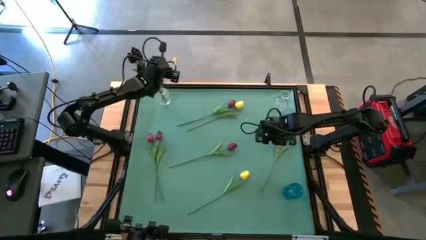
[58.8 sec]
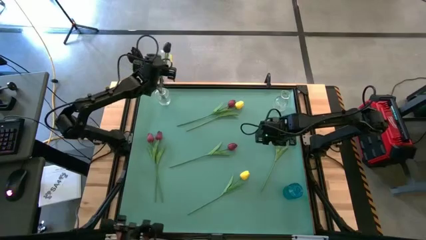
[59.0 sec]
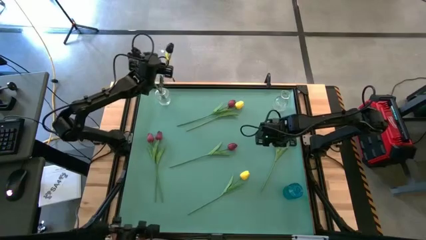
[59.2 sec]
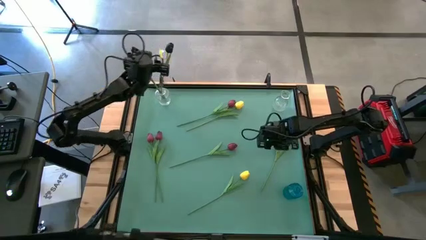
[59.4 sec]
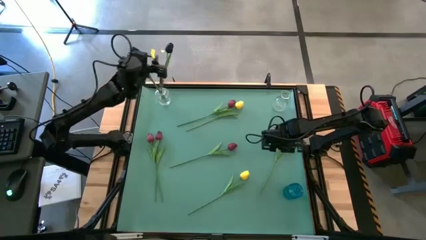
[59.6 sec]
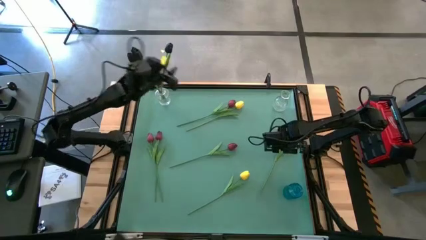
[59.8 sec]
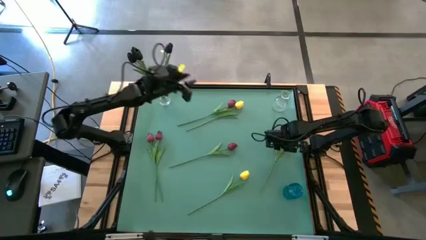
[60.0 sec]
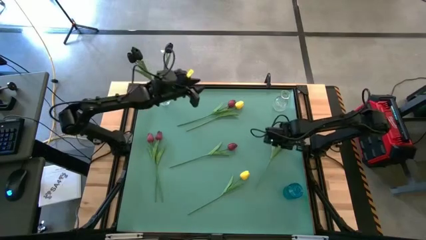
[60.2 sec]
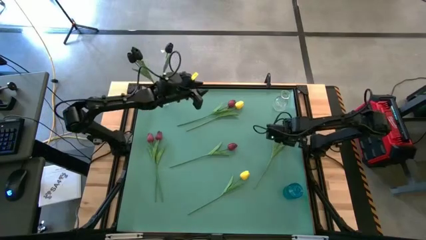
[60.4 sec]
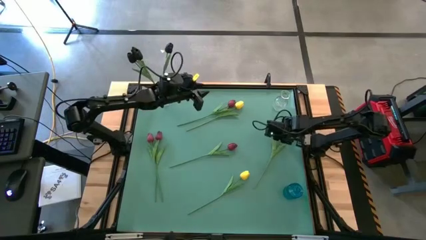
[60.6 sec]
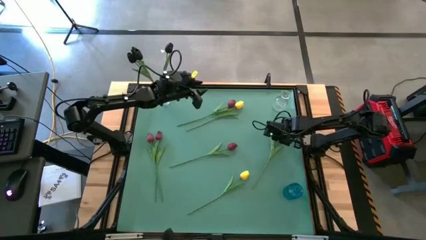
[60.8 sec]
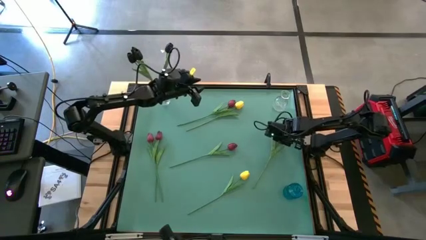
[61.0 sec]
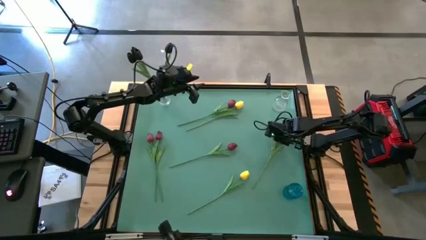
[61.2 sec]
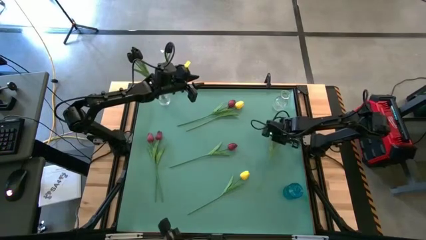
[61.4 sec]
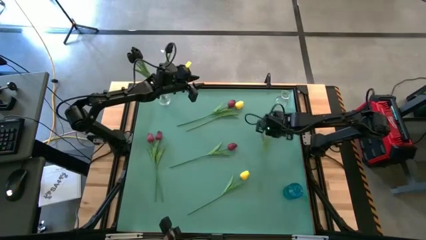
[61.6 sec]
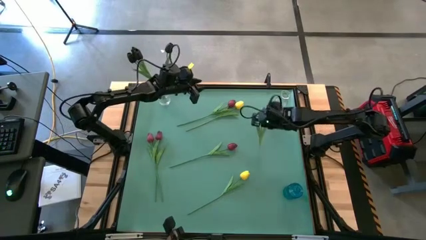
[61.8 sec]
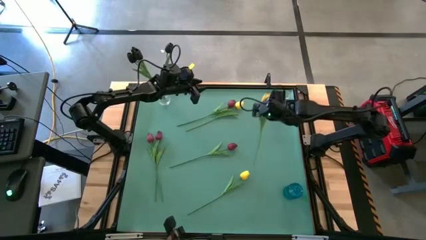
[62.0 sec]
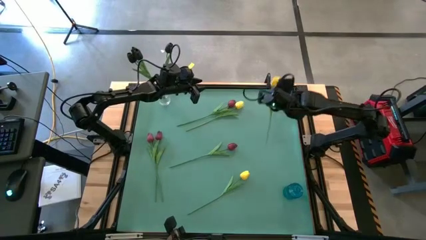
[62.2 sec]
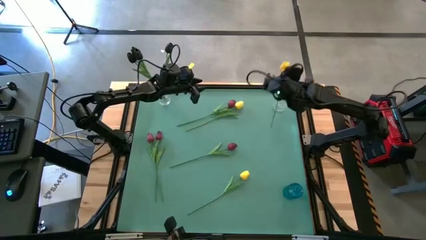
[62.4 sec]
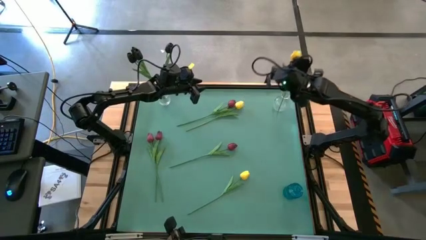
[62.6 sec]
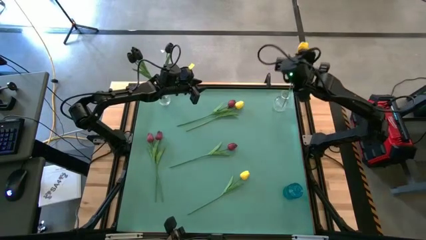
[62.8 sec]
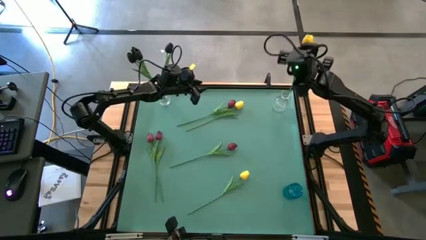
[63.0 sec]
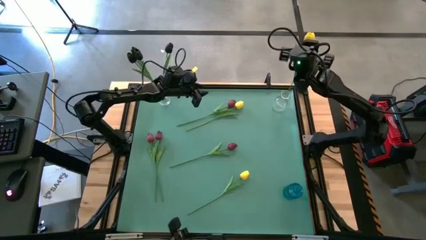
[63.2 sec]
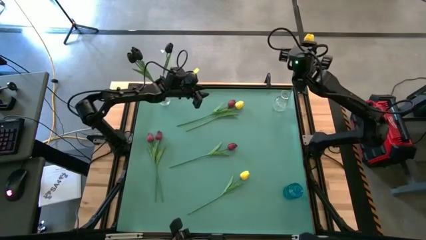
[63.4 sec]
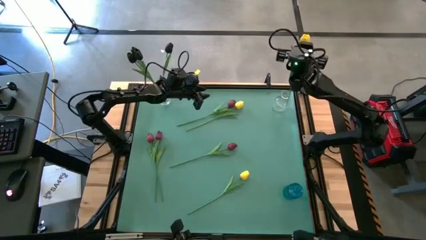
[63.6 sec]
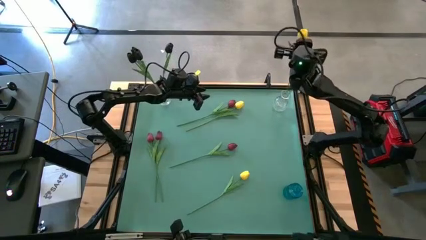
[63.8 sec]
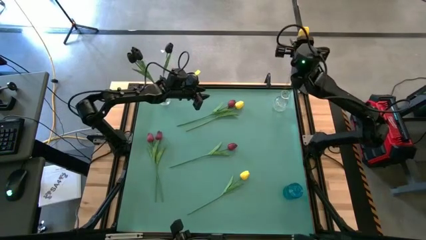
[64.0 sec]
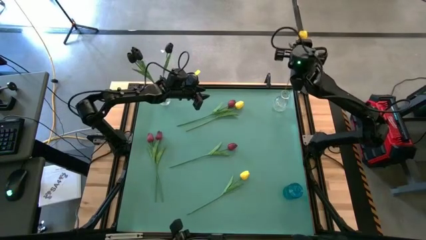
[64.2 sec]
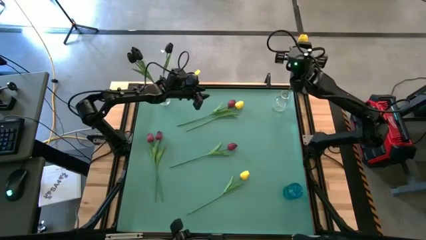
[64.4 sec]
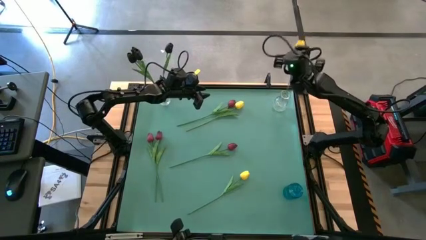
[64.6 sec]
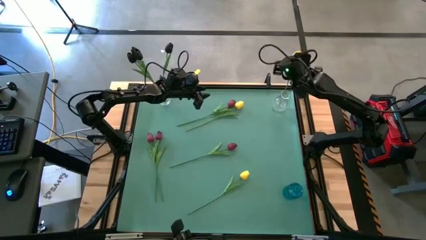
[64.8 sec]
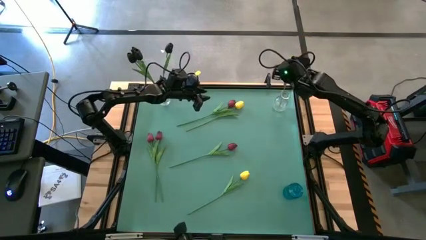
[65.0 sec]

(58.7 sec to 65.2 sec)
Task: Sort flowers into vase by color
Put the yellow flower into the right transparent vase

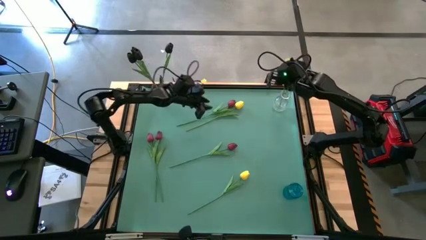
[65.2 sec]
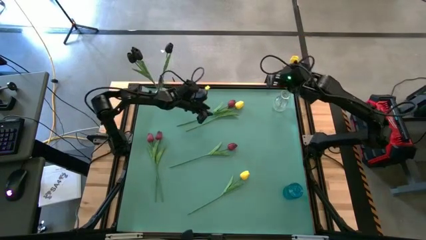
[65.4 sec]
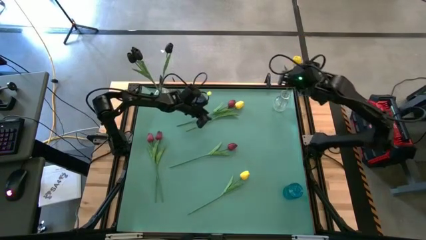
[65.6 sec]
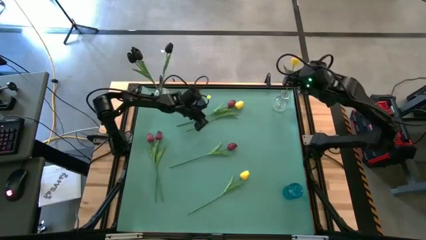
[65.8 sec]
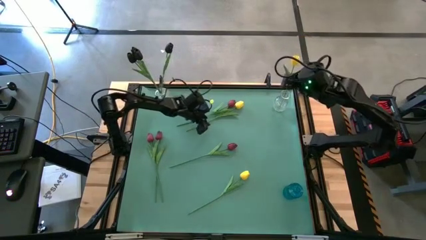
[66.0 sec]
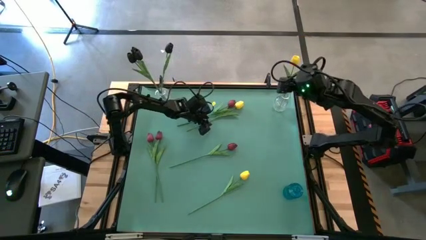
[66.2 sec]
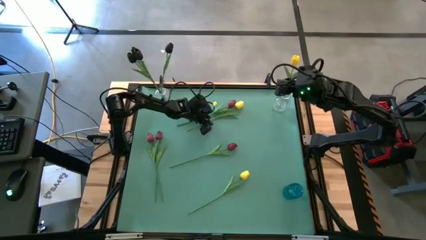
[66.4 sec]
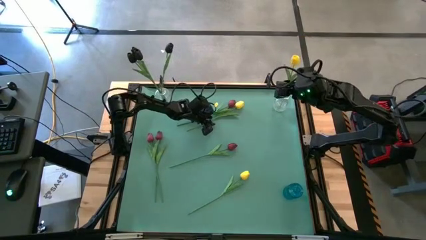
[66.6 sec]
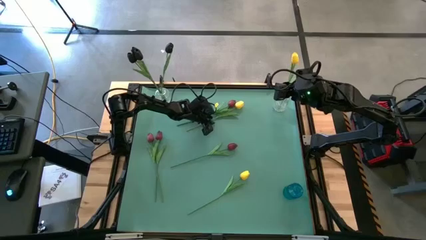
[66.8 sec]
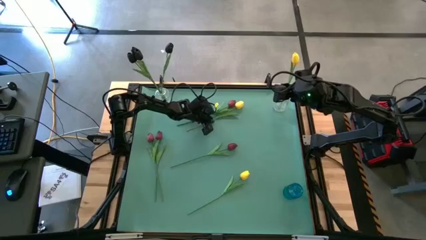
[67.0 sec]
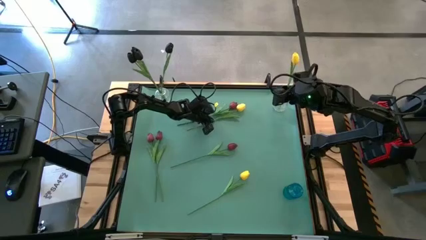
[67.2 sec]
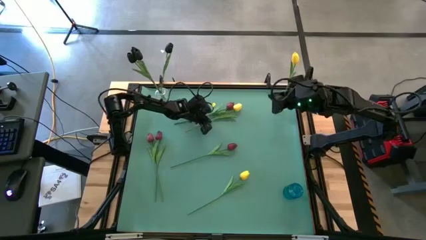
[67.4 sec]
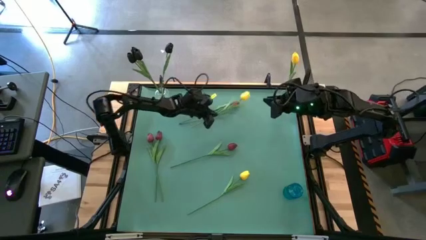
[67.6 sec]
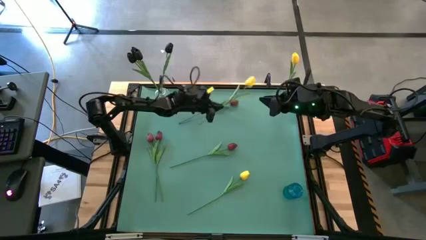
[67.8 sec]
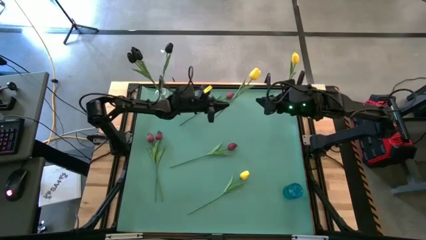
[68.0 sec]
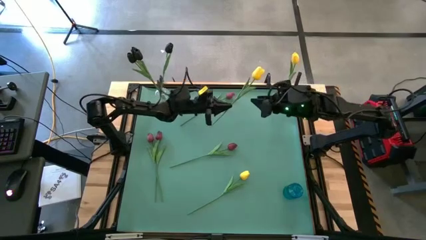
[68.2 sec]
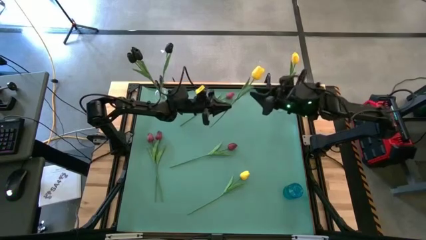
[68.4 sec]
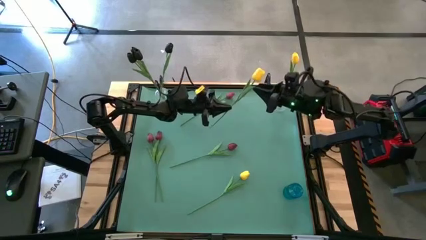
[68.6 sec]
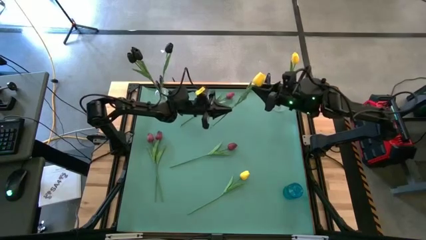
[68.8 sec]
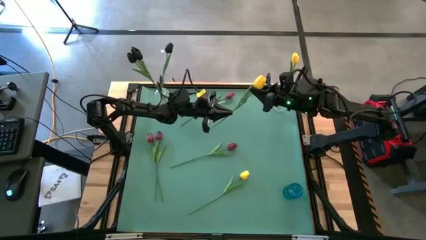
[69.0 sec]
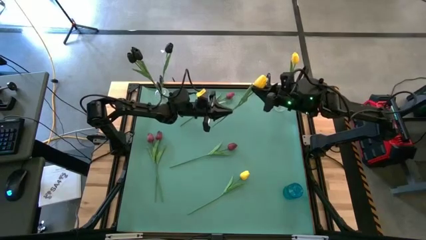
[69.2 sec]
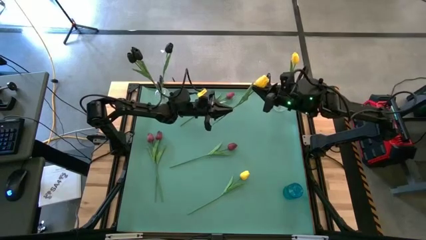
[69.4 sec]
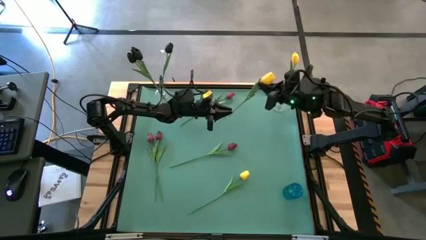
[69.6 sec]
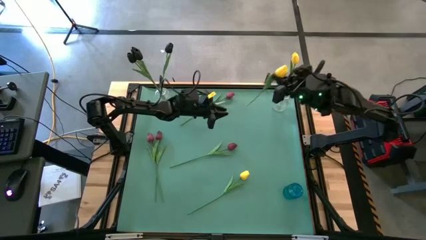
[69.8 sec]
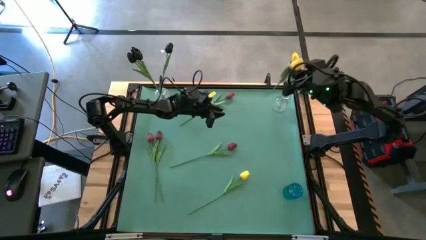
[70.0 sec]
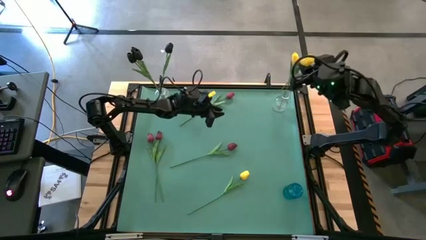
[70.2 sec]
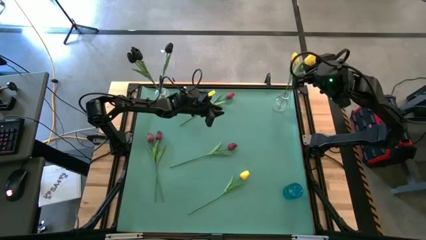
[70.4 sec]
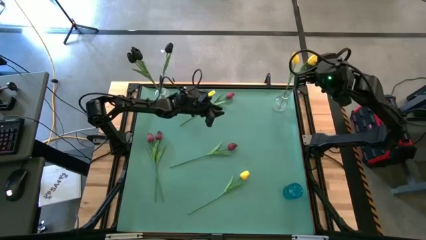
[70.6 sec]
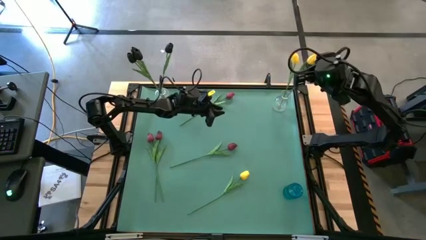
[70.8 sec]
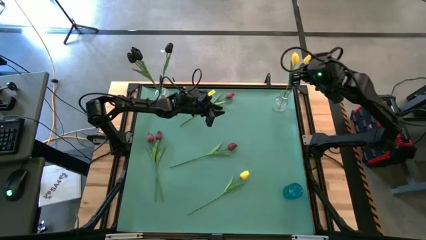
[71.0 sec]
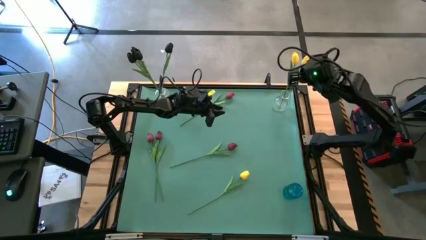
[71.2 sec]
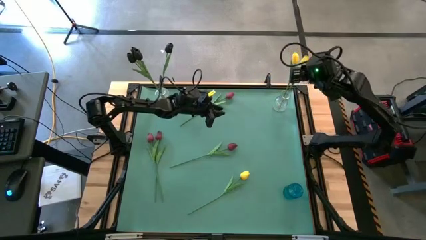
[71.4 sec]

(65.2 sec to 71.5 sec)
Put the yellow flower into the right transparent vase
